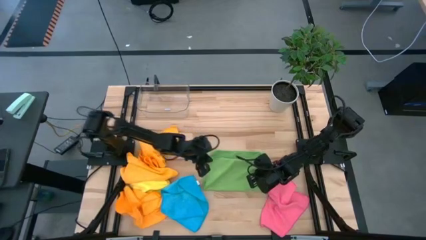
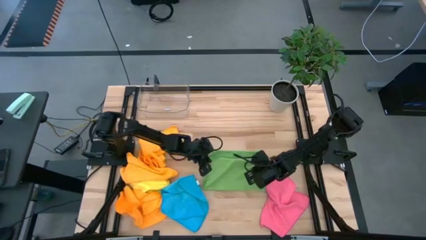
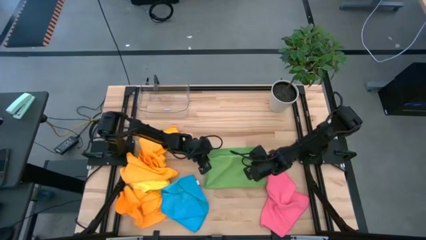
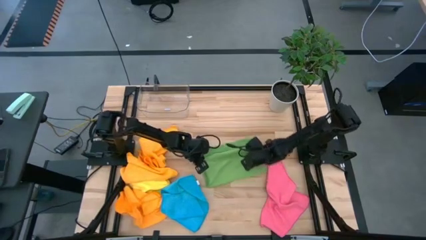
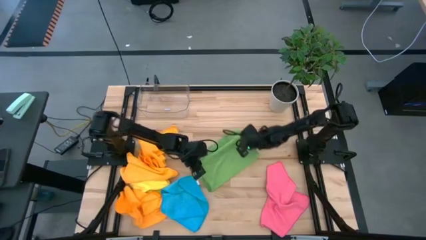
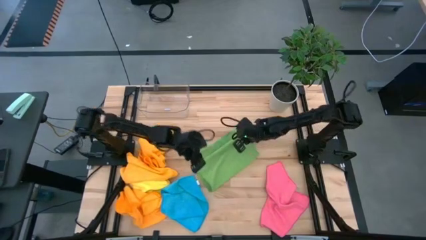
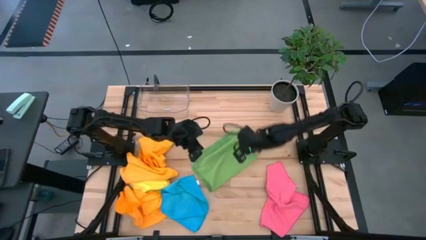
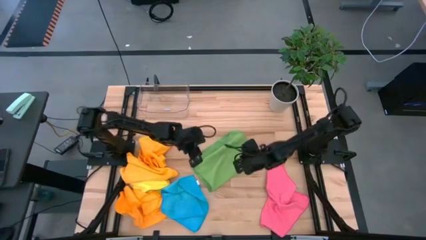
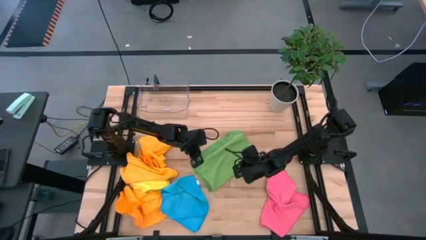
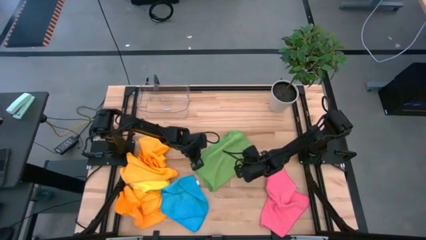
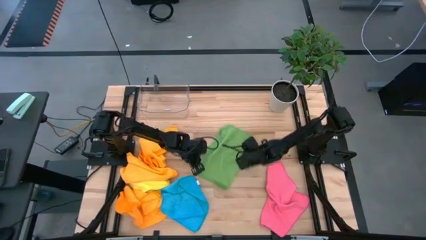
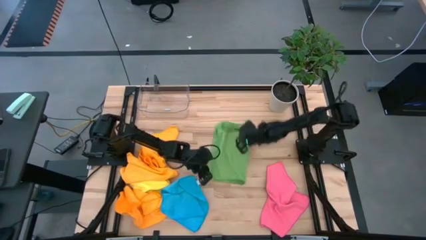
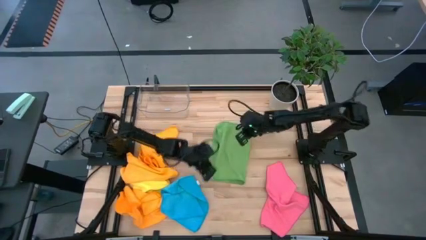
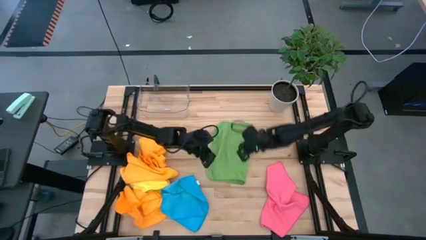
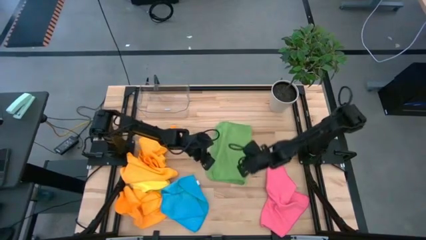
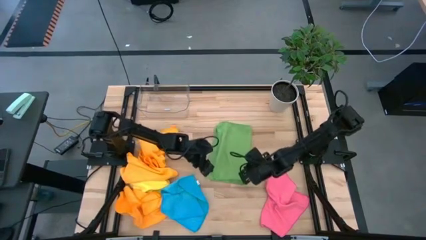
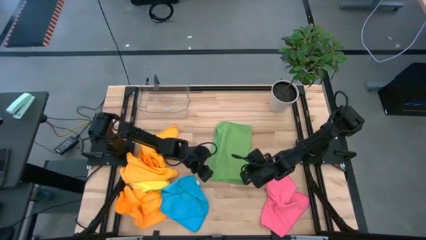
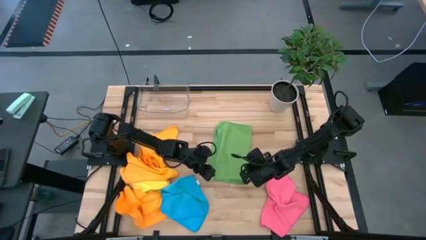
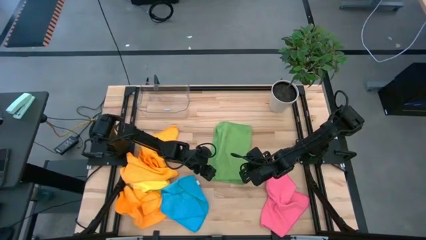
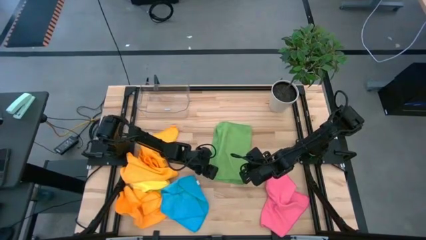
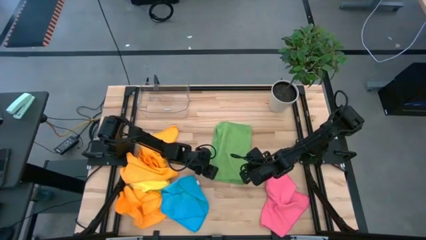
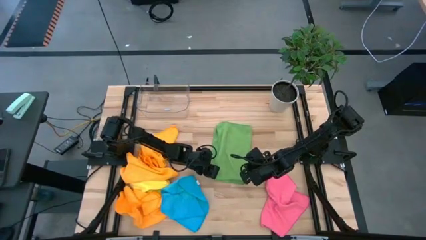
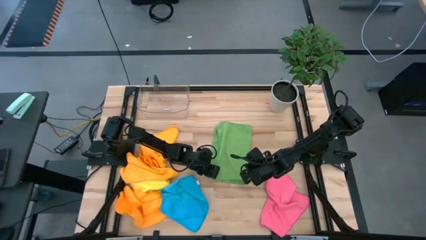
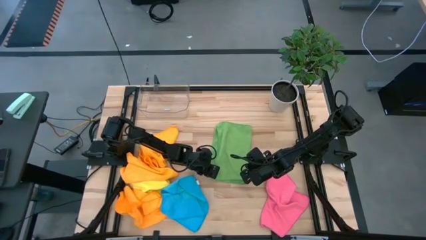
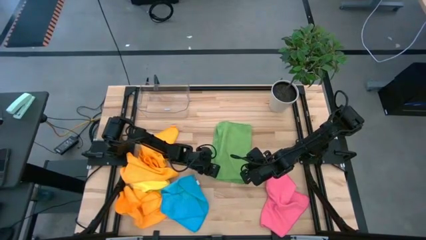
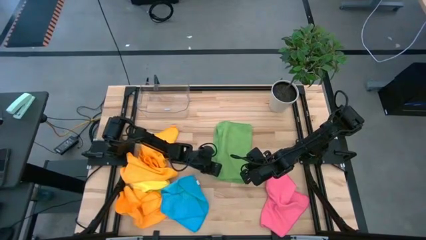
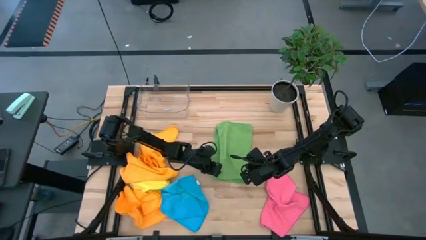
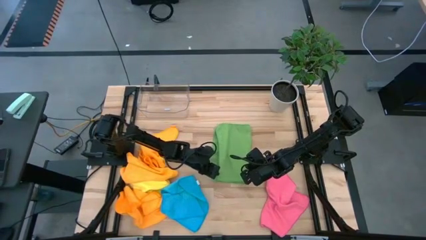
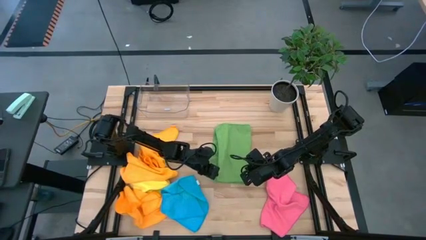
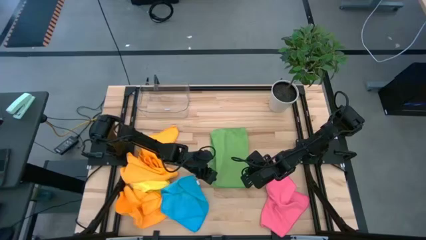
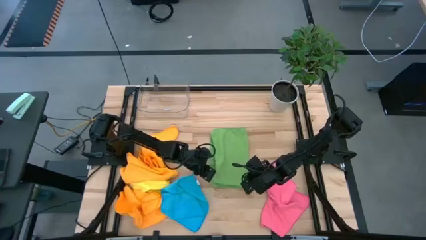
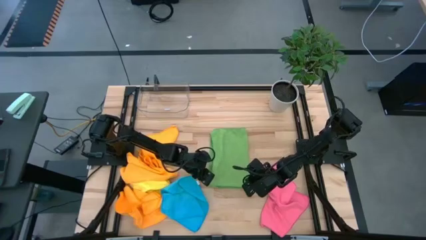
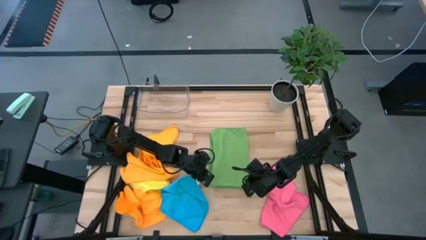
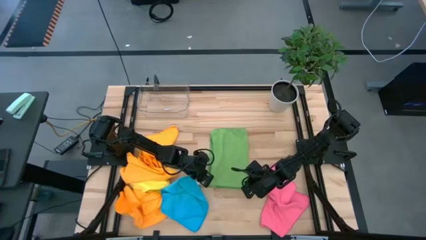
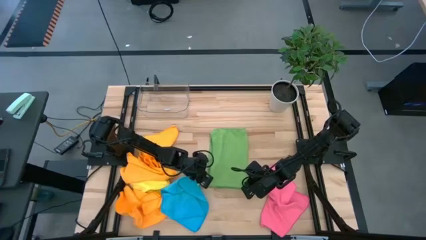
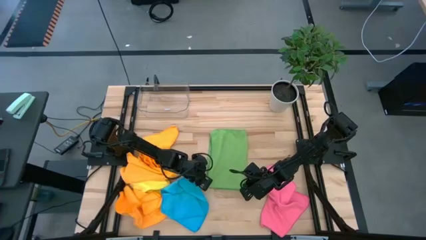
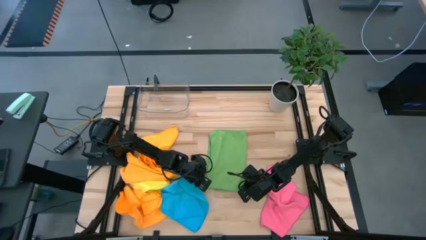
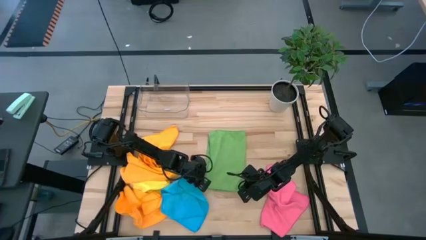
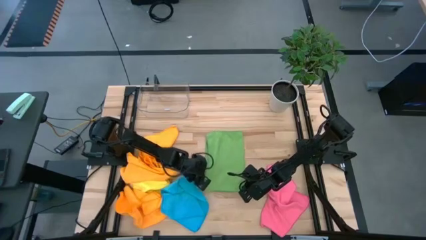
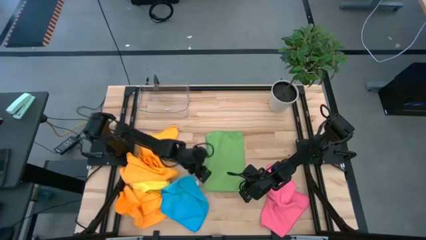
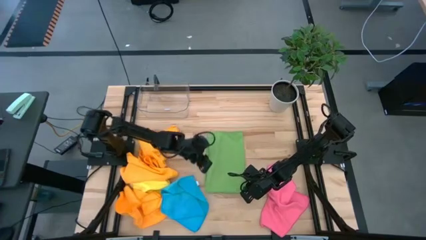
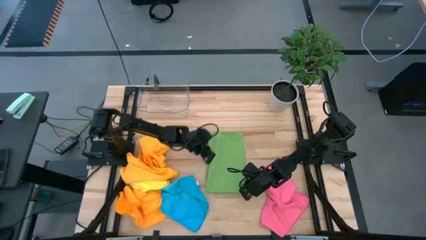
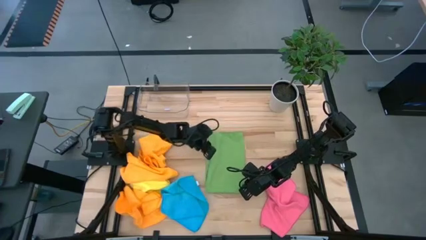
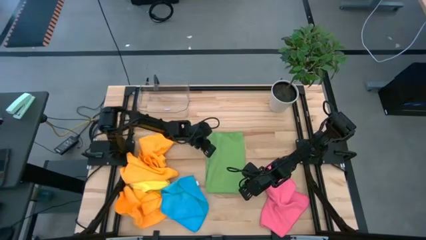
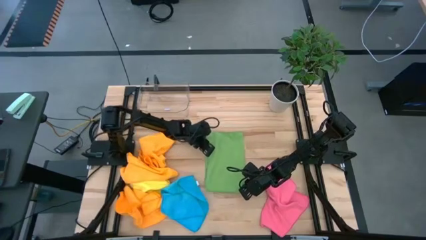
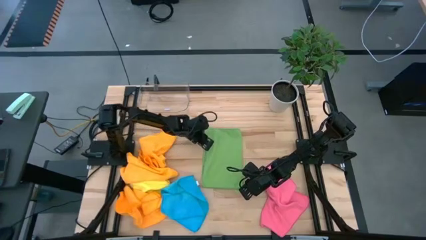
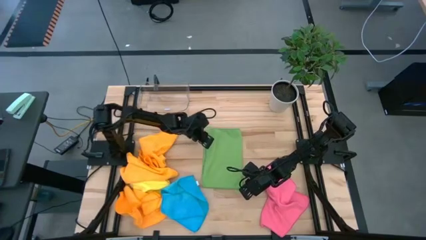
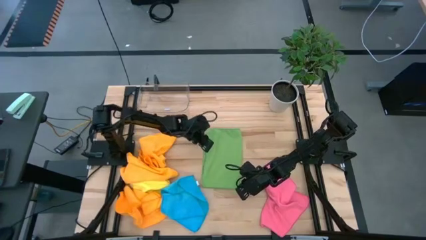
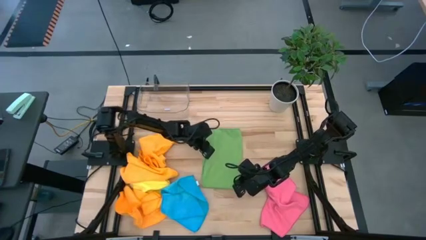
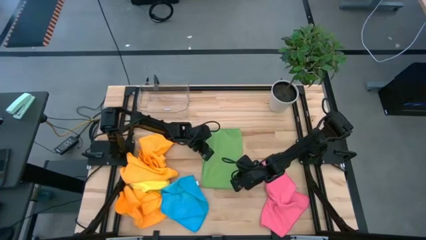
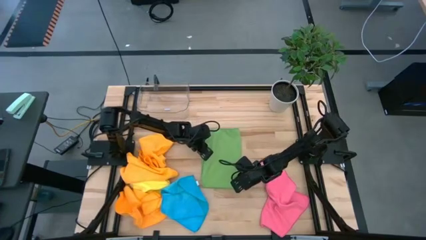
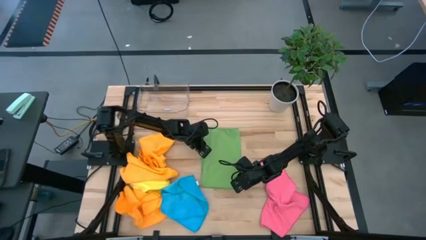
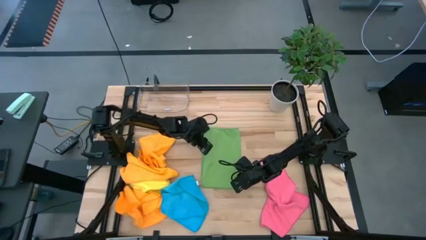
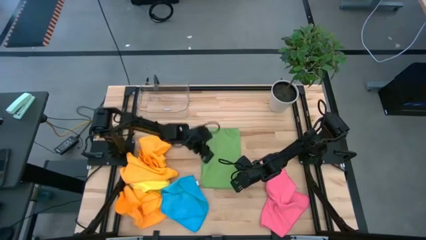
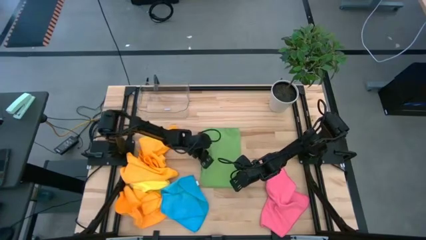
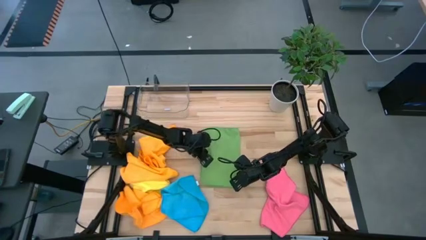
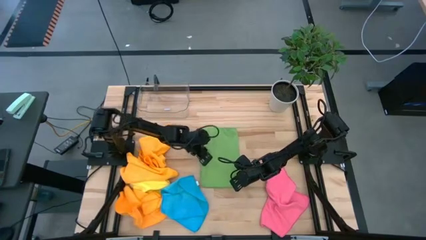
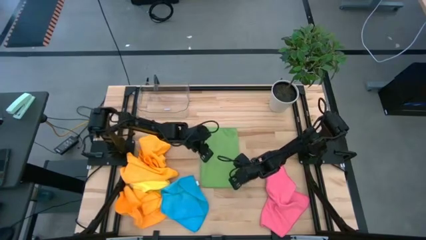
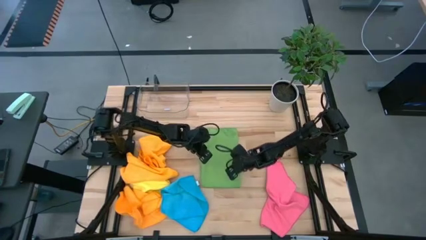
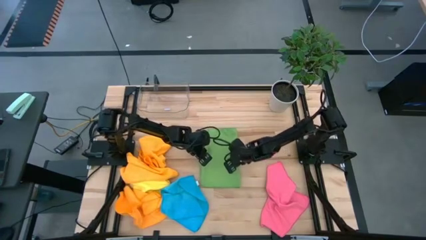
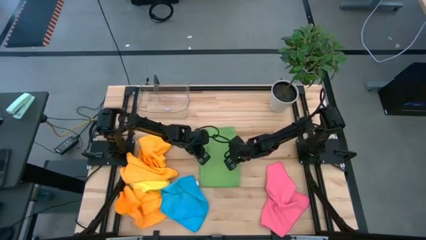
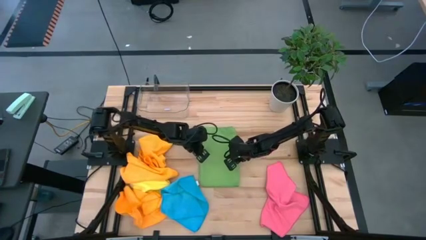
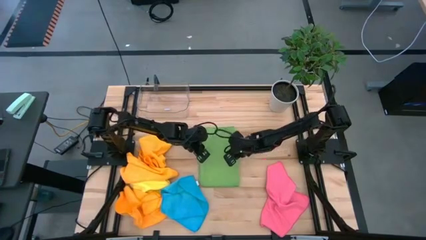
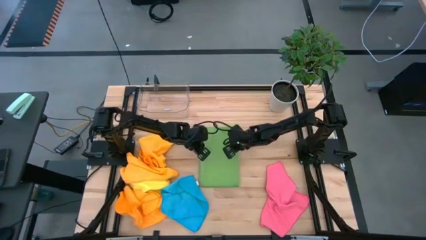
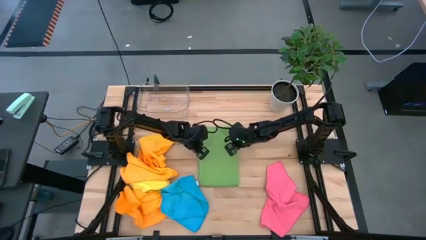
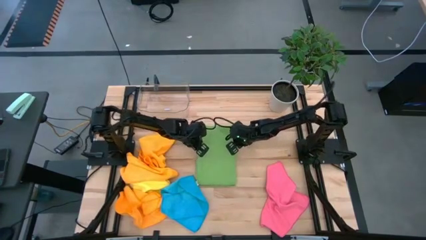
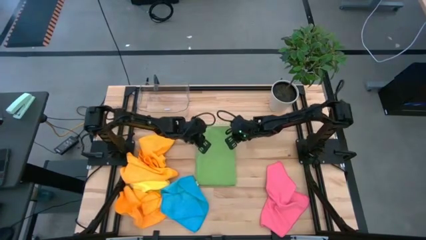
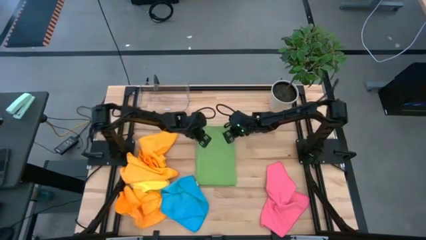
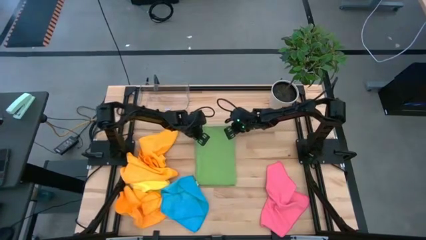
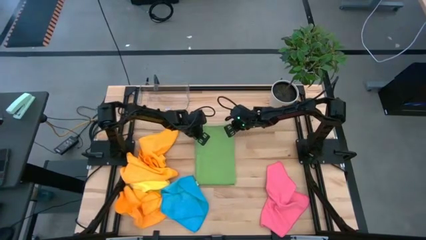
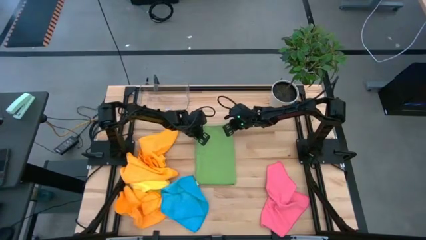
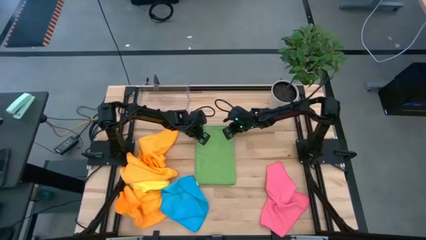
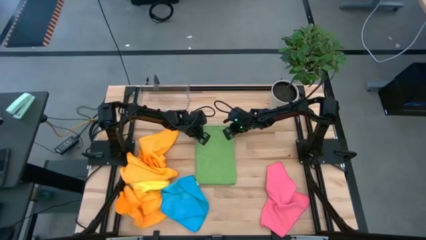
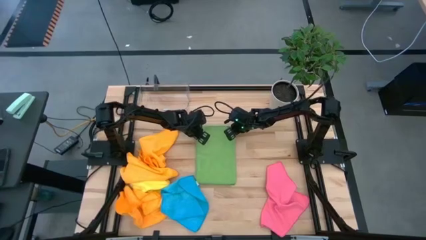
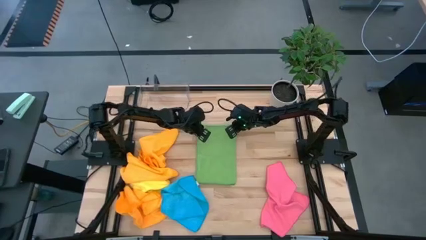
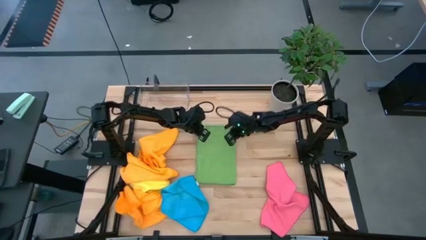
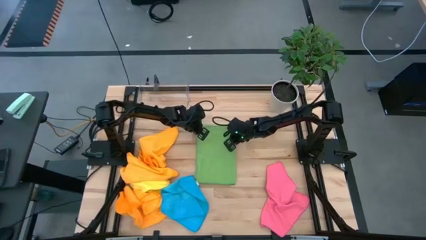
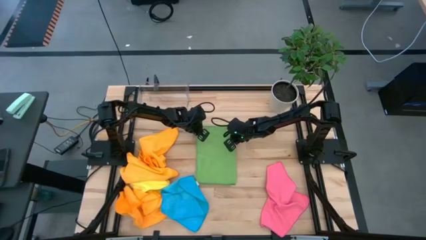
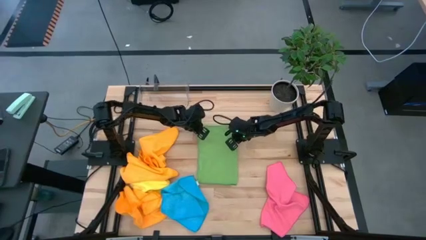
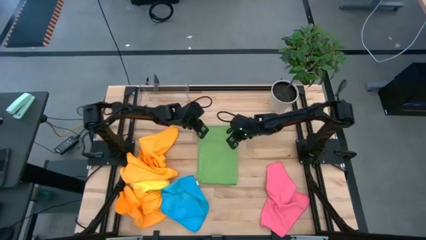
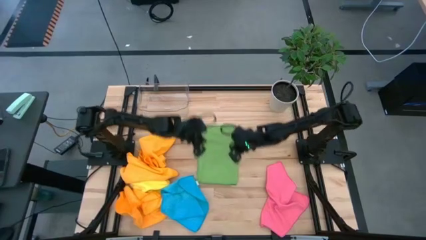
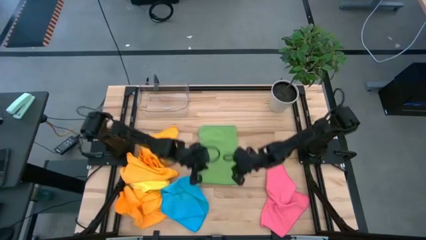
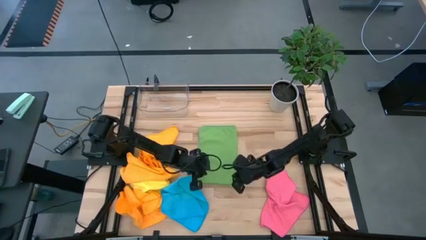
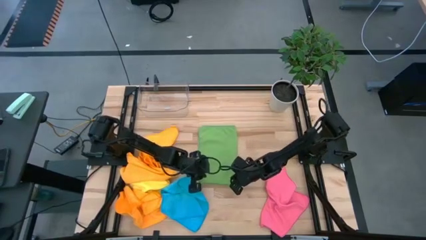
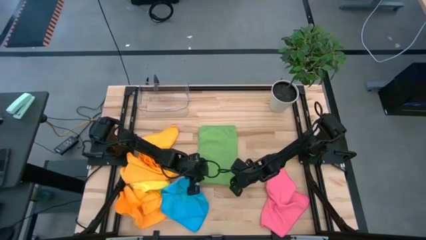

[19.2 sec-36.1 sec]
Task: Fold microfiber towels
Fold the green towel
